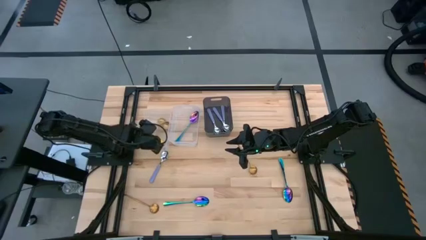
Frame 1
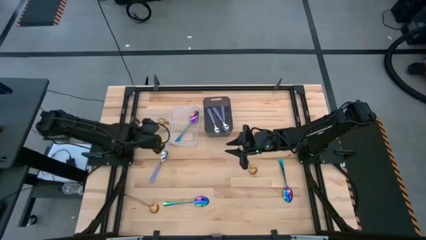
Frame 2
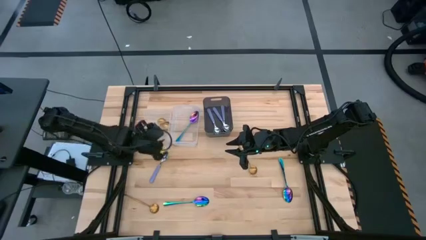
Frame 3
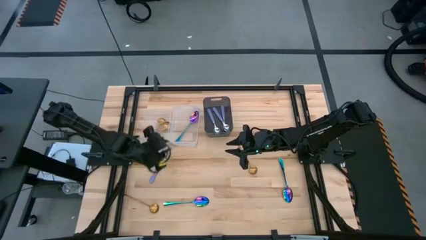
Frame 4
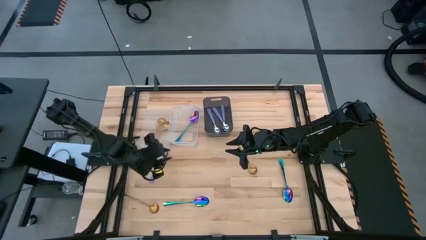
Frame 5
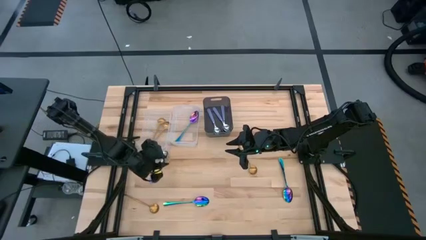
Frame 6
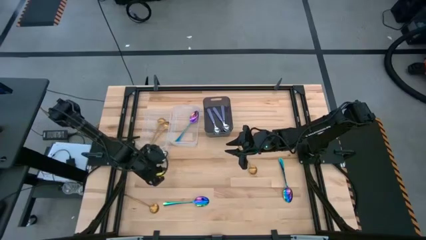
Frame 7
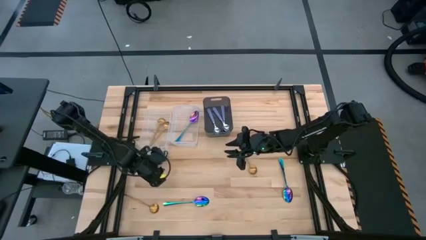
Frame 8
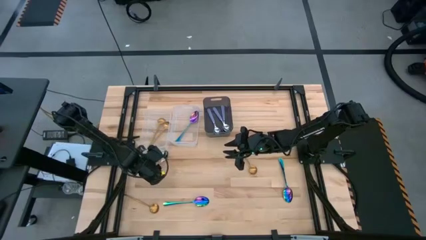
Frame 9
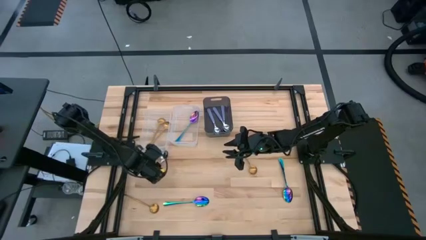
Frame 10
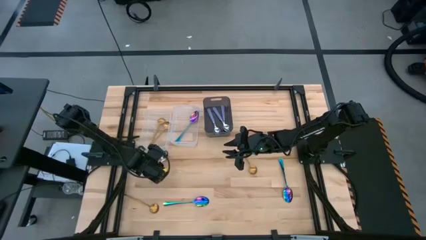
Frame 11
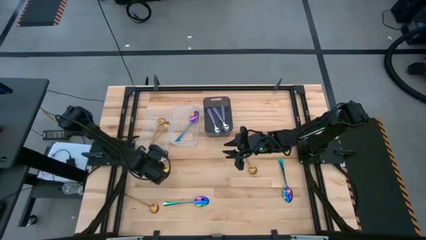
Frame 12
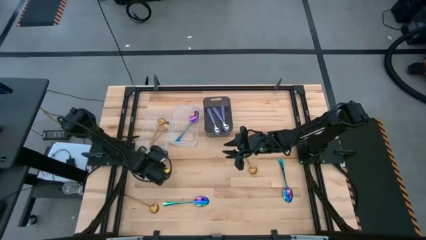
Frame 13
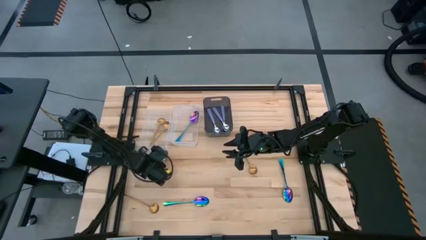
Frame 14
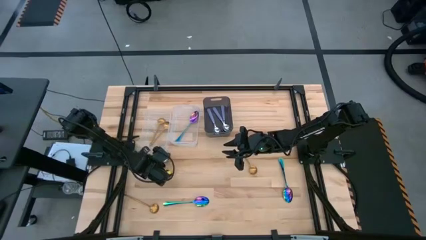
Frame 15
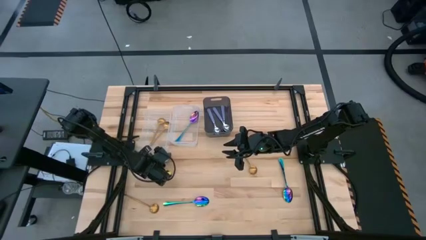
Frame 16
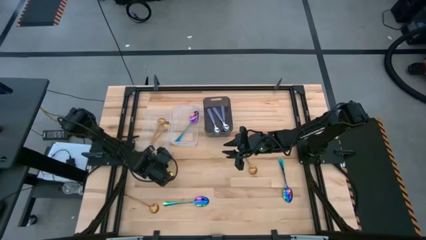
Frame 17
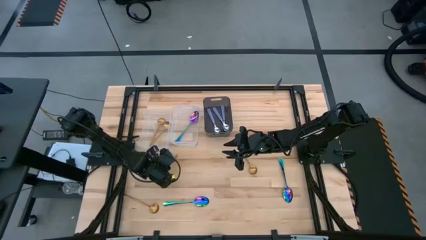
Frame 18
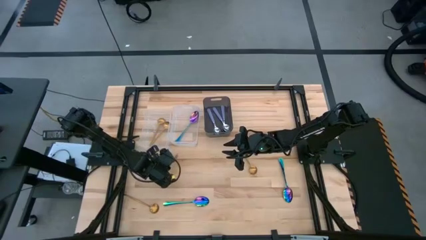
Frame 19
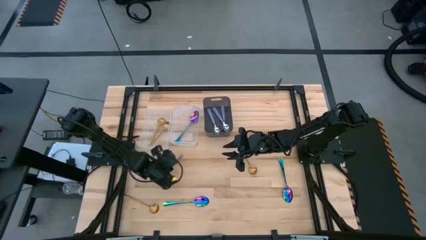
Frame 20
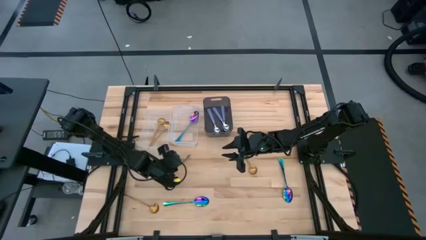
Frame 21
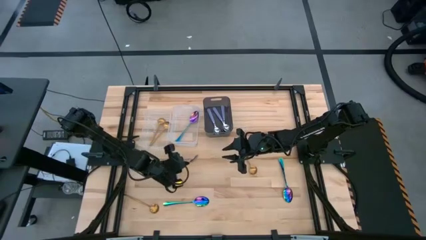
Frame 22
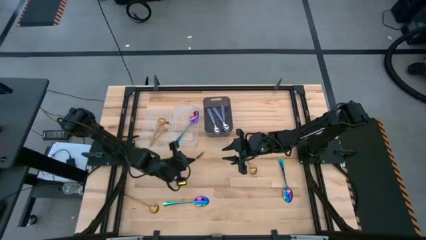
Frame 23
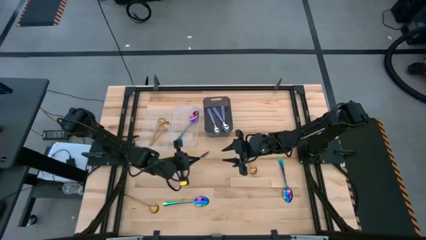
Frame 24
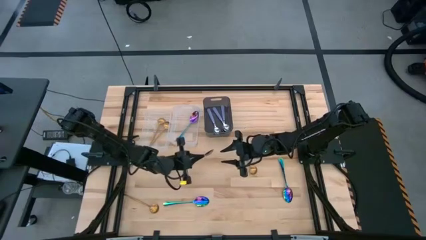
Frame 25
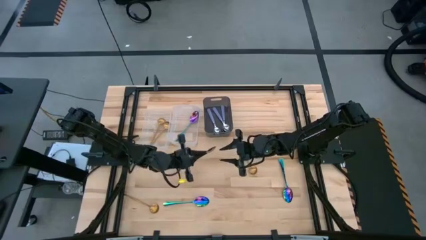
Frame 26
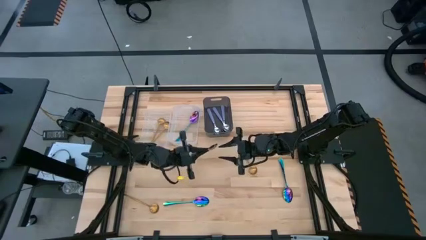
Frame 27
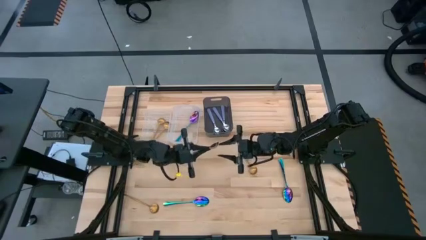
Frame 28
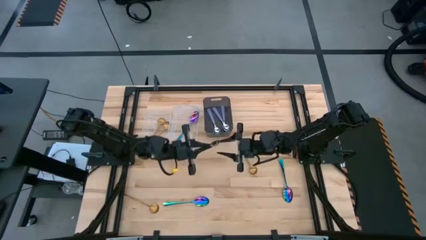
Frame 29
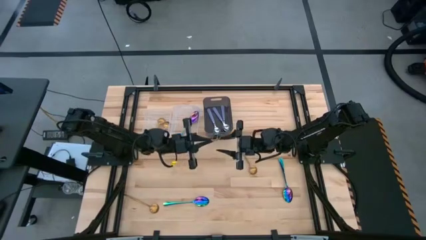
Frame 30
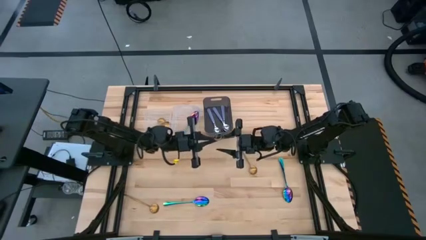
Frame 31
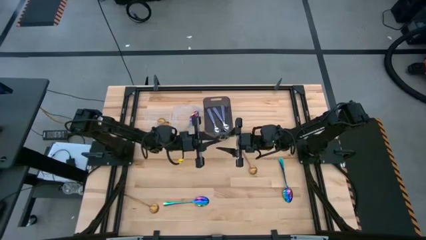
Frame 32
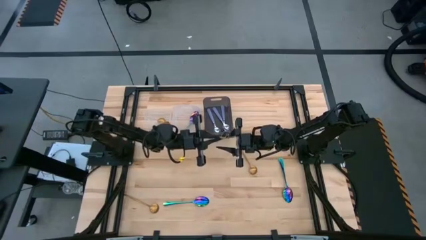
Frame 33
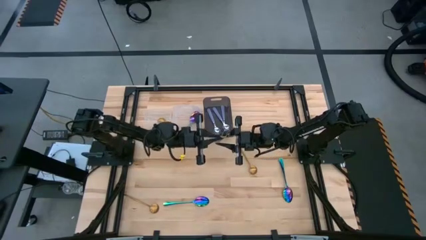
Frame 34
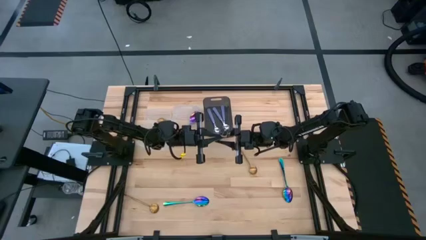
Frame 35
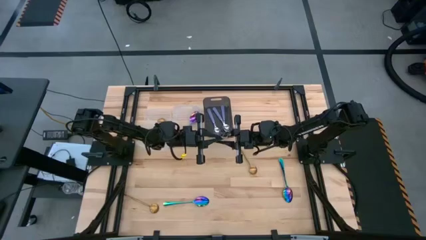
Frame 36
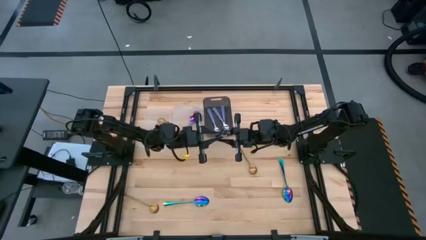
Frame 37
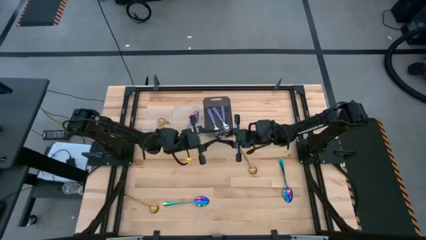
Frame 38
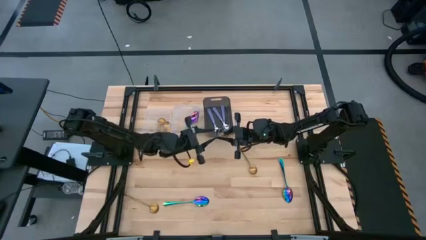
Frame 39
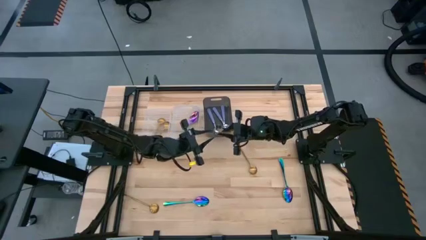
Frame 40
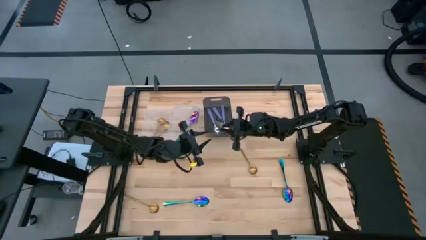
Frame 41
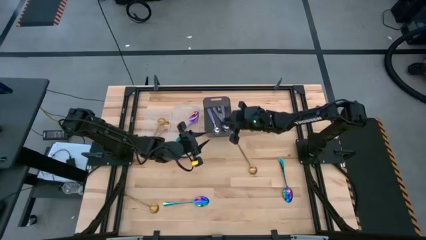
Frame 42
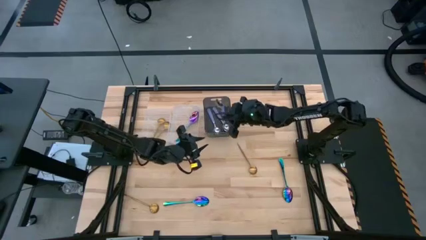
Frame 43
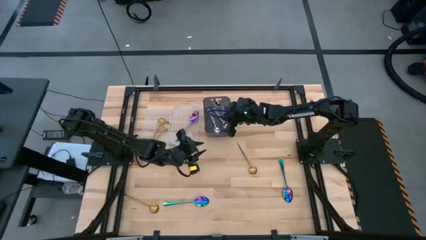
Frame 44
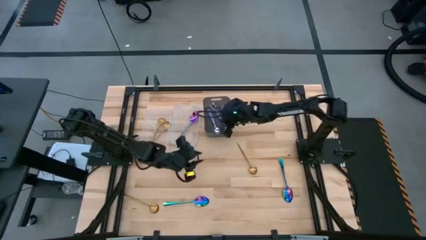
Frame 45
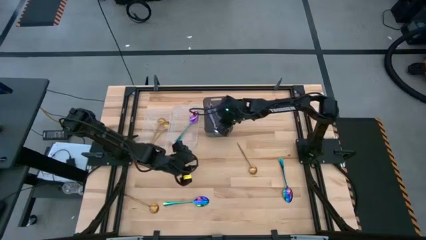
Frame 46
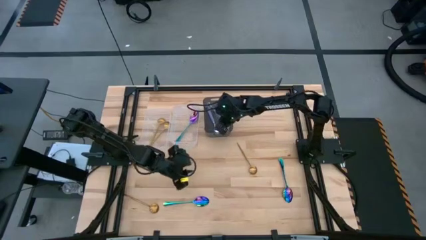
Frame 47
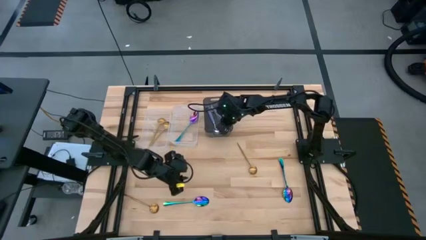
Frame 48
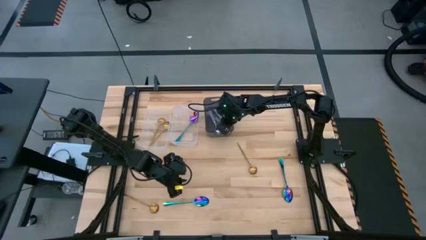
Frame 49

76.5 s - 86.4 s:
Task: Sort silverware by color (type)
Put the purple spoon into the black transparent bin

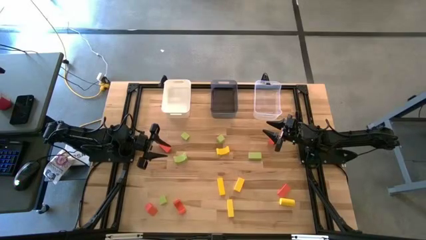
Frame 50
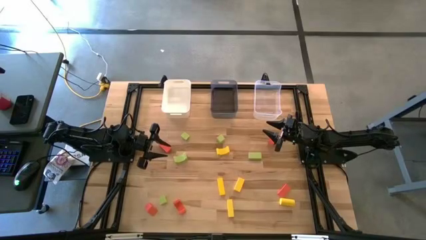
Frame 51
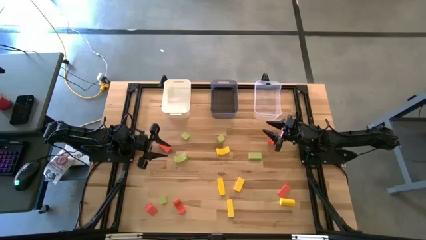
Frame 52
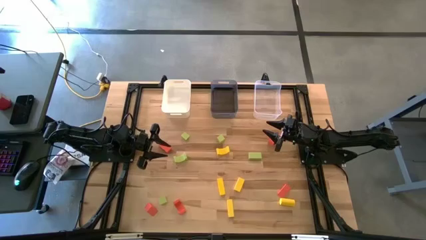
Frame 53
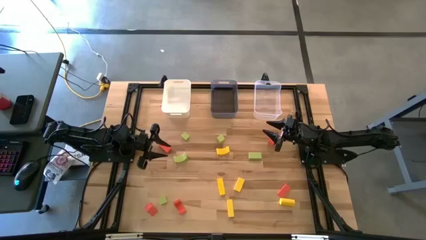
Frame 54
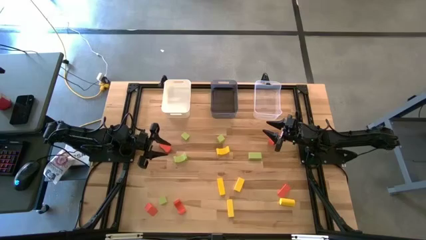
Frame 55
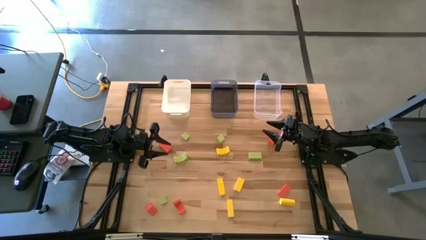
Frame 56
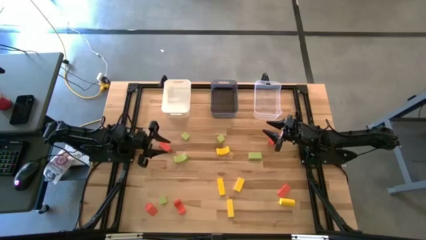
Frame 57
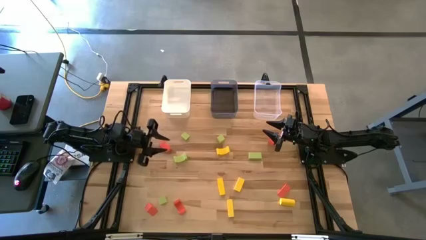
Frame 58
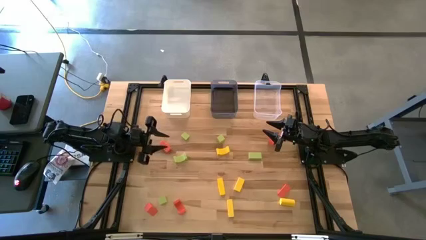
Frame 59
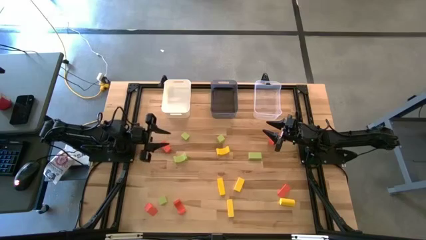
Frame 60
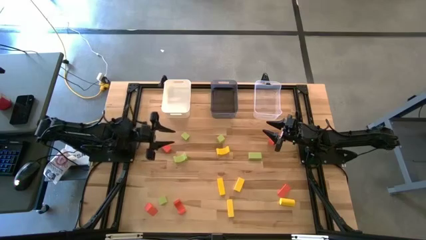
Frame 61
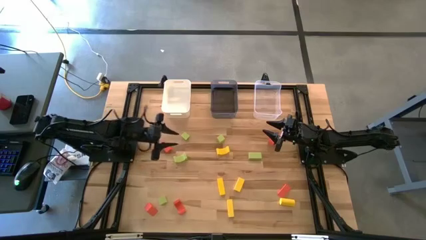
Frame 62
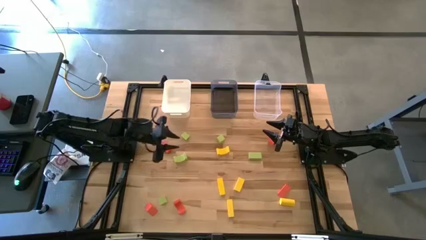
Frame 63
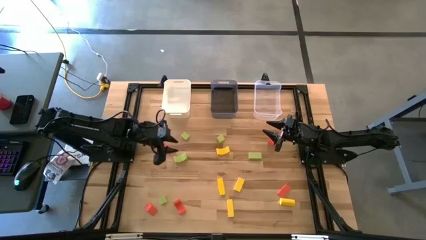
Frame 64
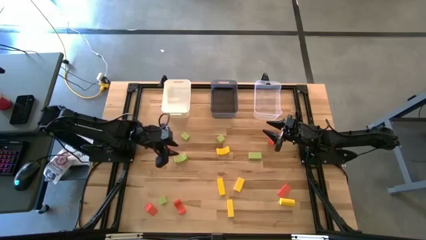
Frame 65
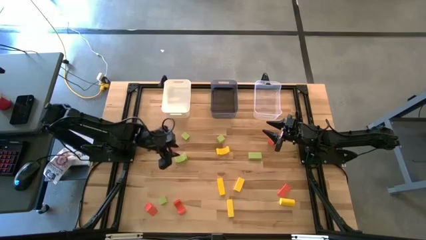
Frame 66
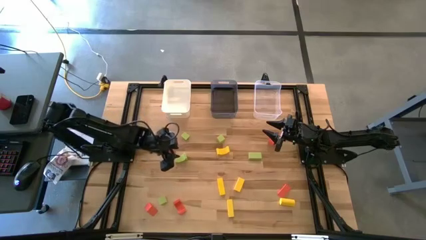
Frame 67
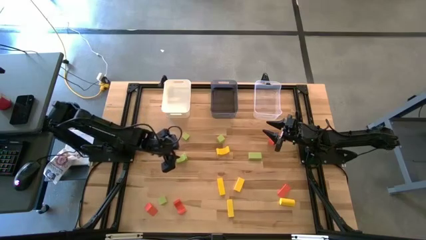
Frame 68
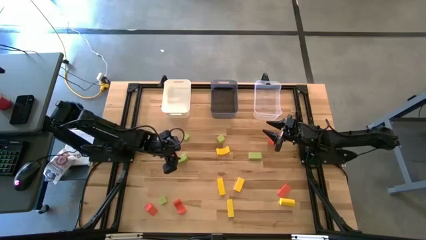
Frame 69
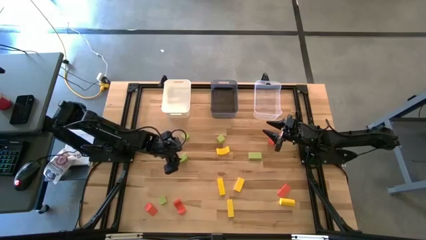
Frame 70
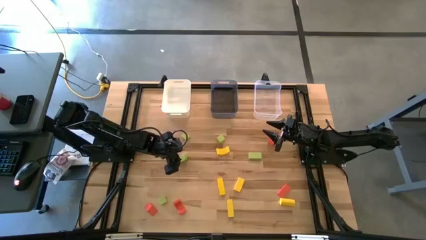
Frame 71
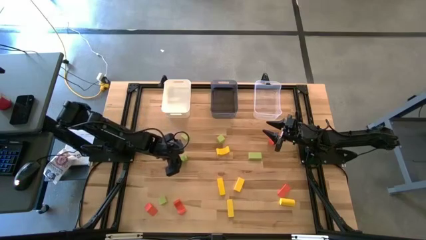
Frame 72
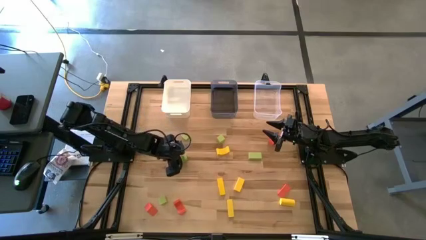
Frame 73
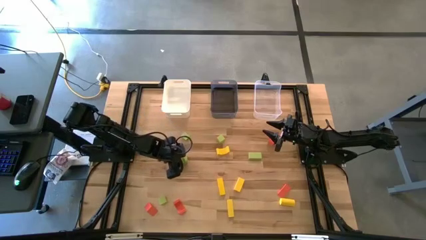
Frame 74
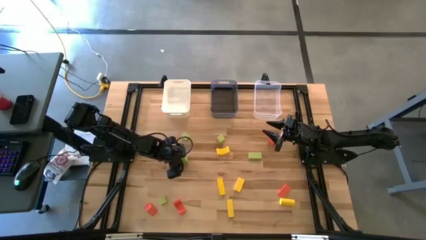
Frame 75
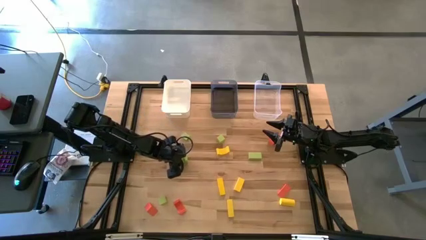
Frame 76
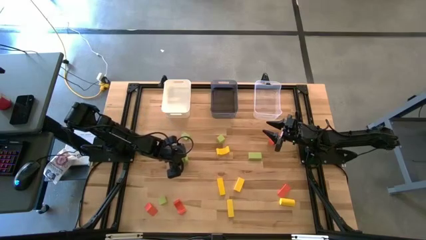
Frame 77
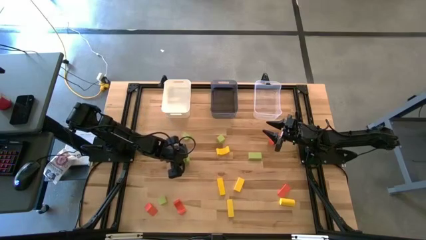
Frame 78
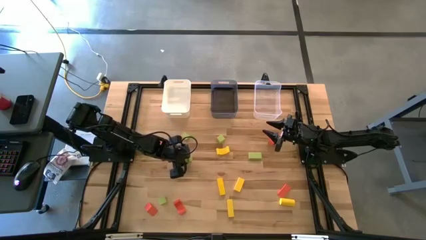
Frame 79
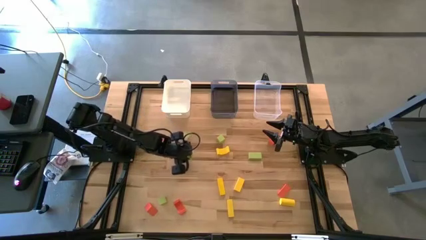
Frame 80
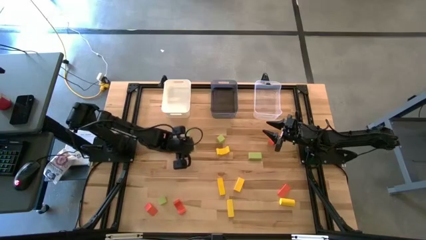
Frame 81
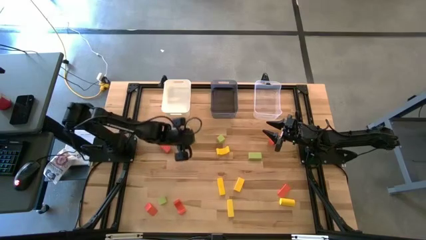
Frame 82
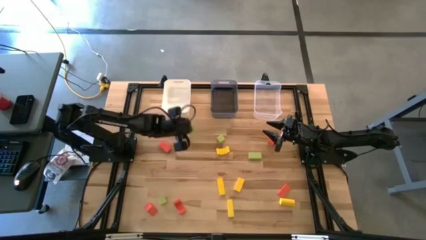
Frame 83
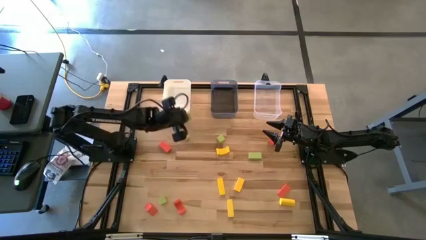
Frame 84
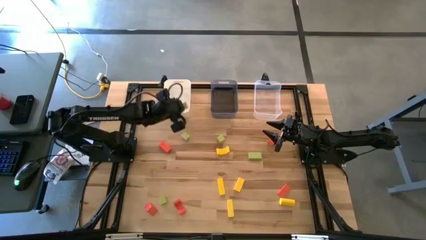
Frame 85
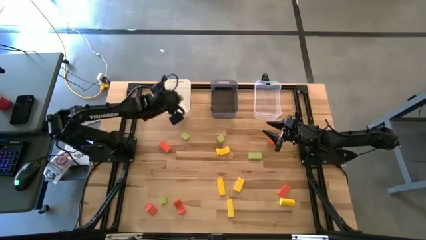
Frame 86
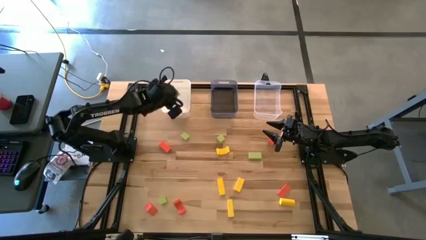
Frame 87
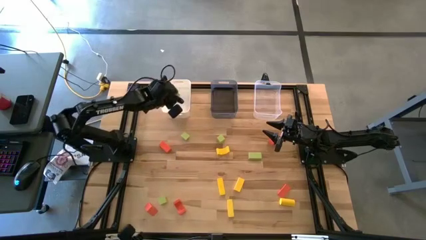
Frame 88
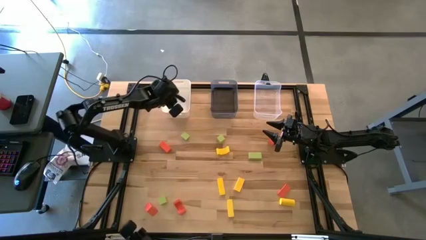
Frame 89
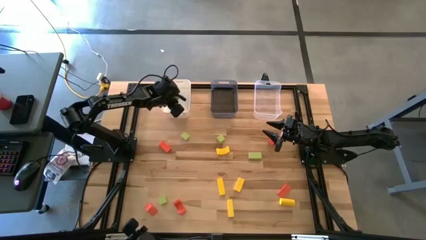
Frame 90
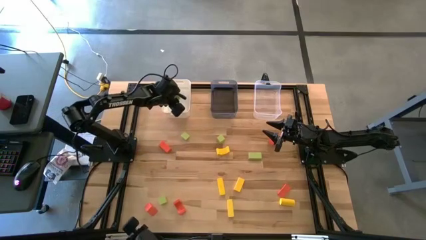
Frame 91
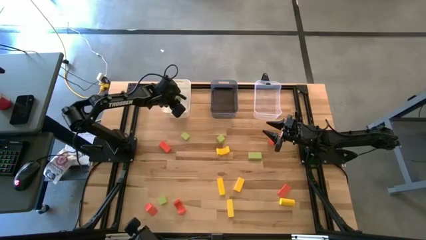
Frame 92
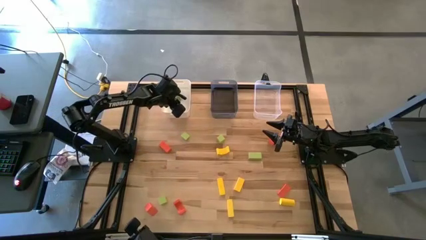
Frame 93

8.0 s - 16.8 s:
Task: Sort & place blocks by color
Put the green block into the white bin
